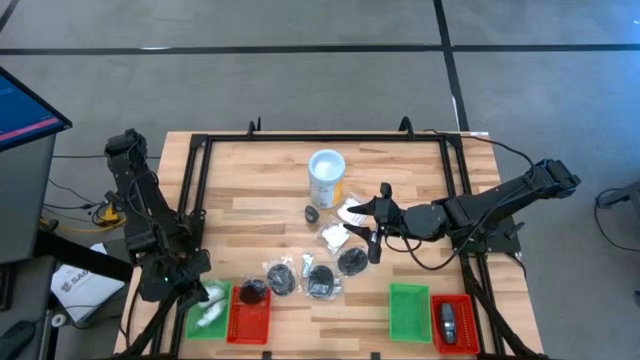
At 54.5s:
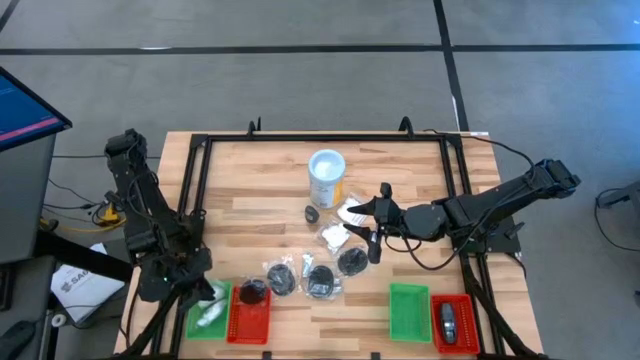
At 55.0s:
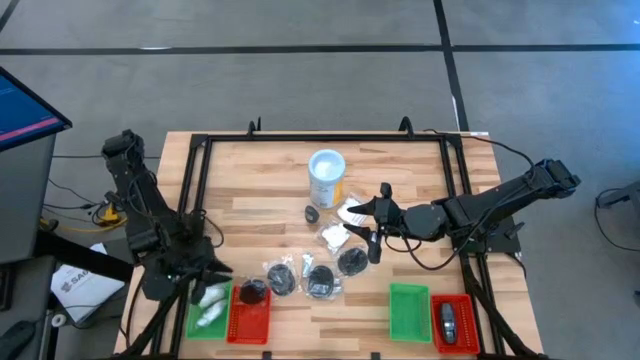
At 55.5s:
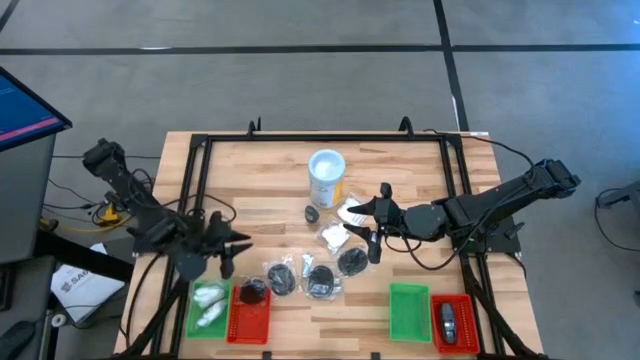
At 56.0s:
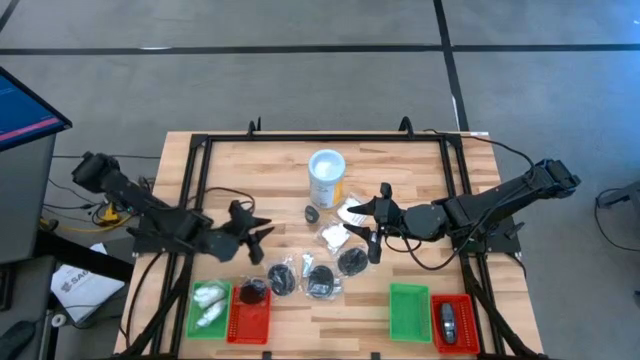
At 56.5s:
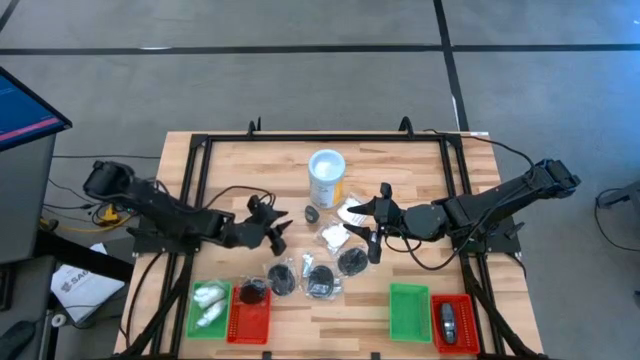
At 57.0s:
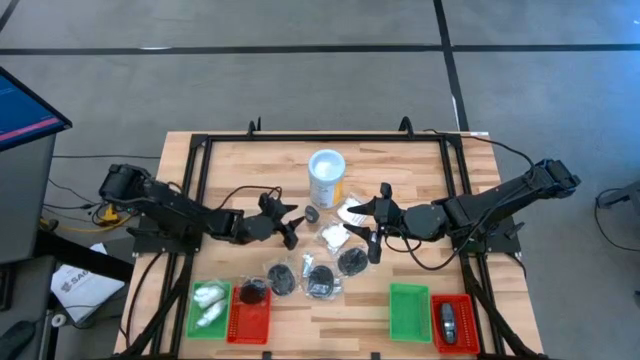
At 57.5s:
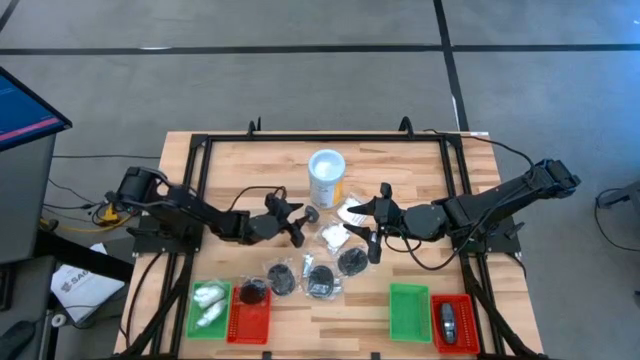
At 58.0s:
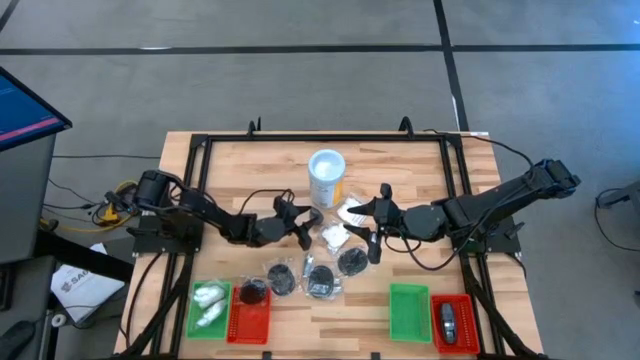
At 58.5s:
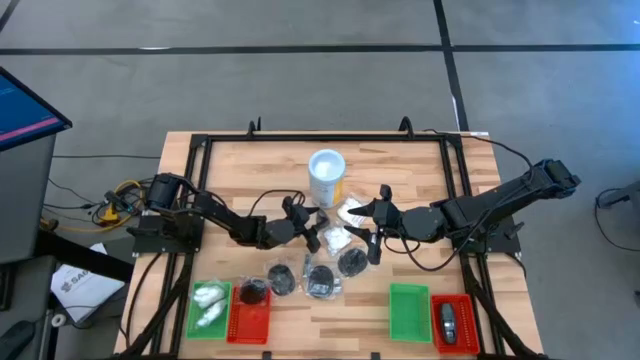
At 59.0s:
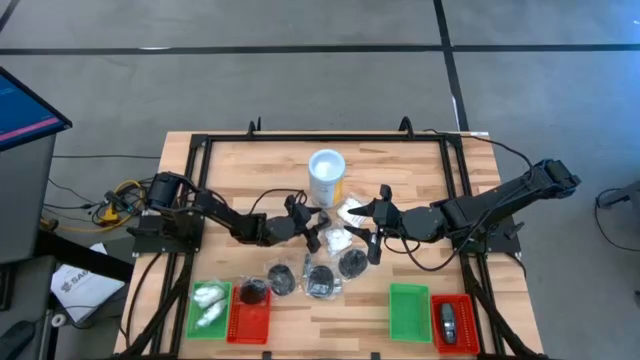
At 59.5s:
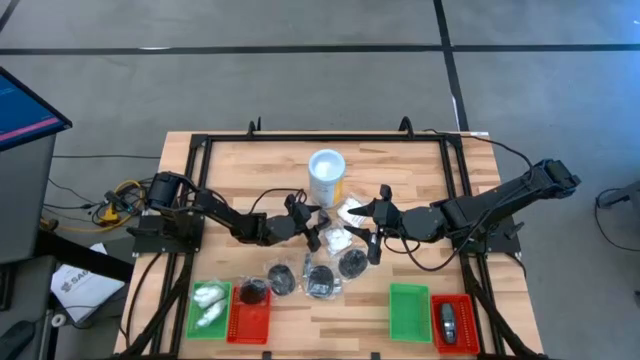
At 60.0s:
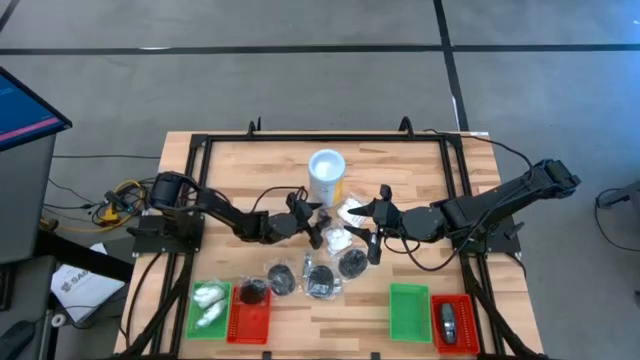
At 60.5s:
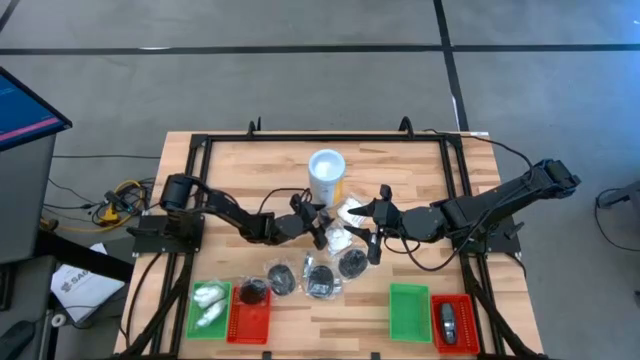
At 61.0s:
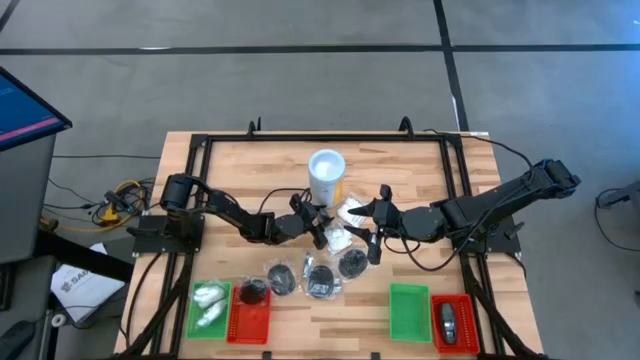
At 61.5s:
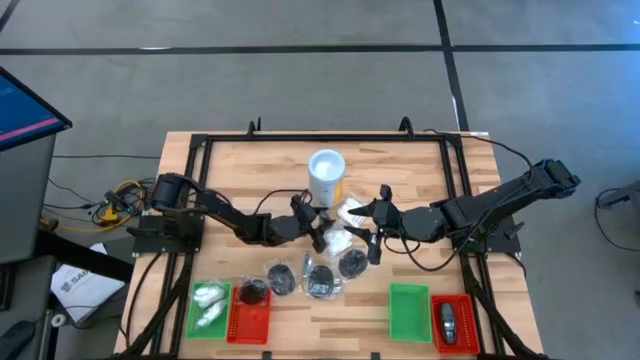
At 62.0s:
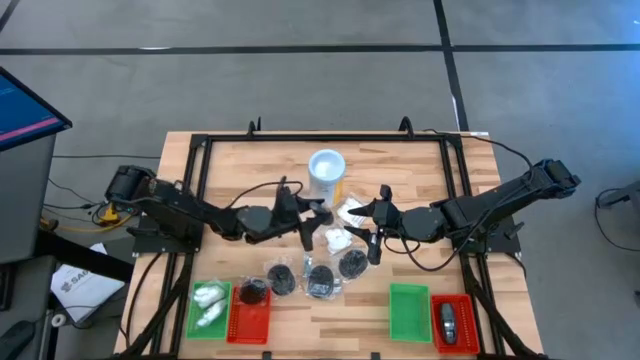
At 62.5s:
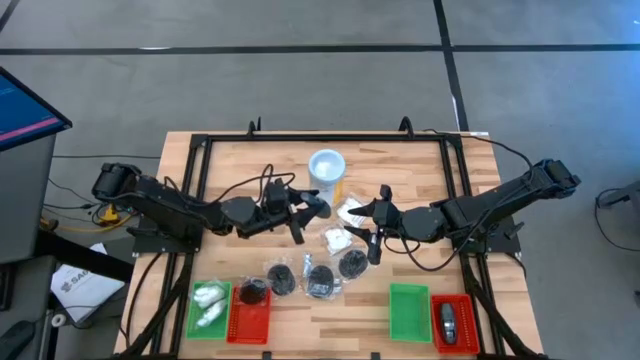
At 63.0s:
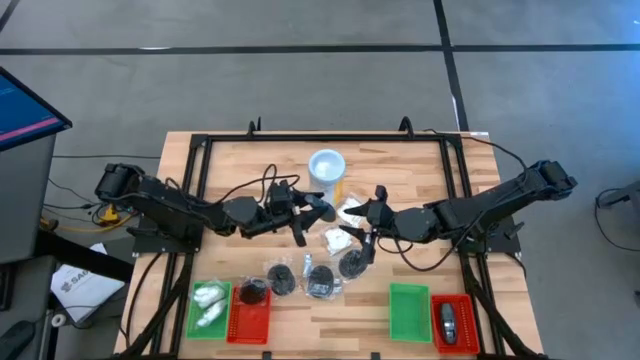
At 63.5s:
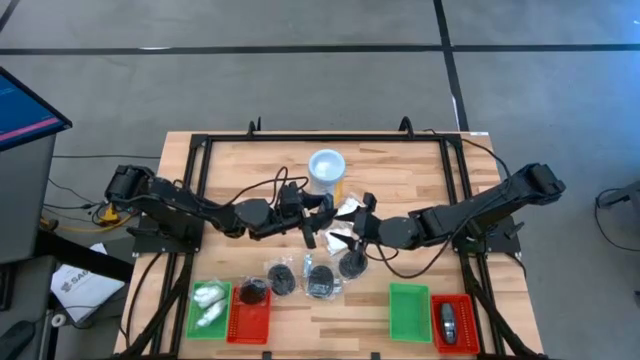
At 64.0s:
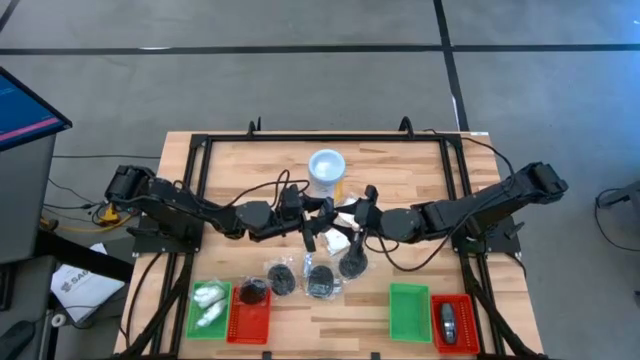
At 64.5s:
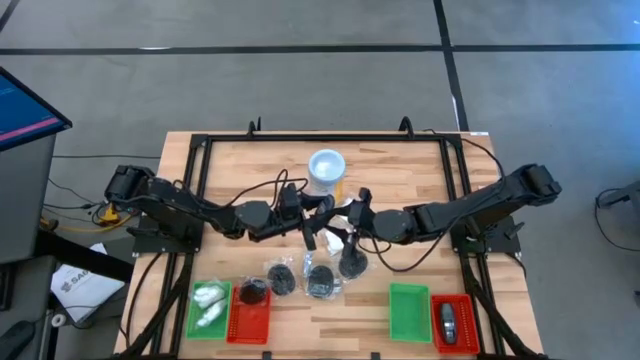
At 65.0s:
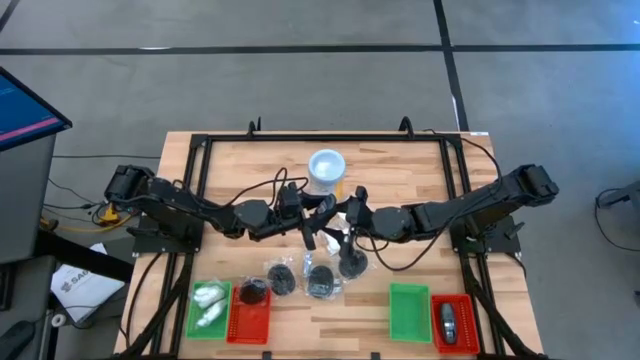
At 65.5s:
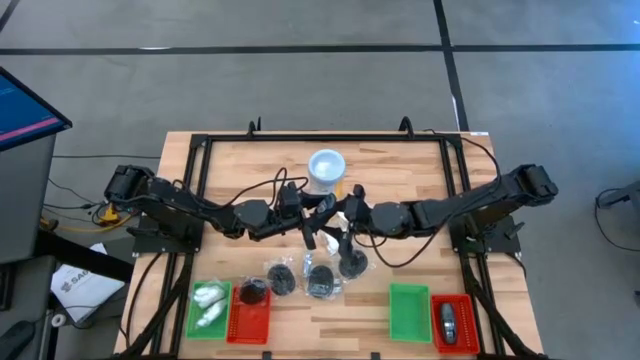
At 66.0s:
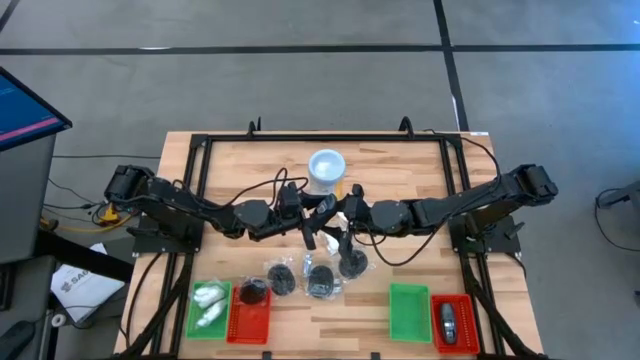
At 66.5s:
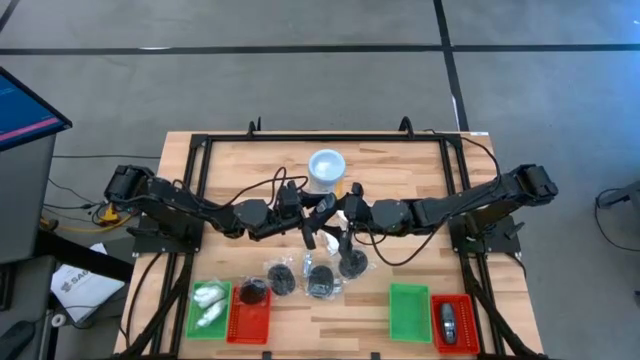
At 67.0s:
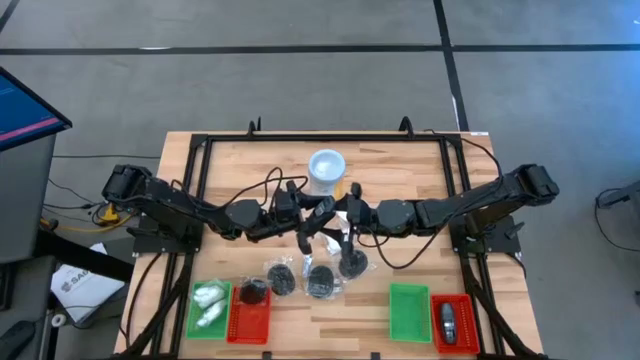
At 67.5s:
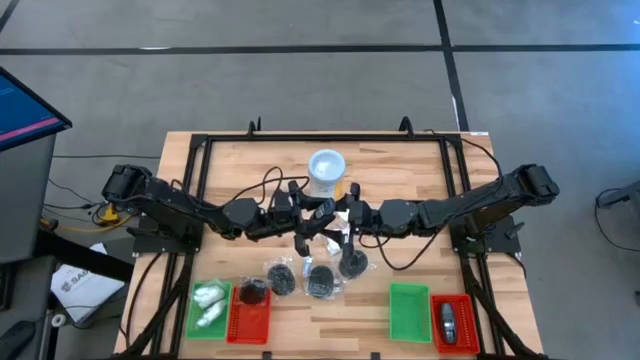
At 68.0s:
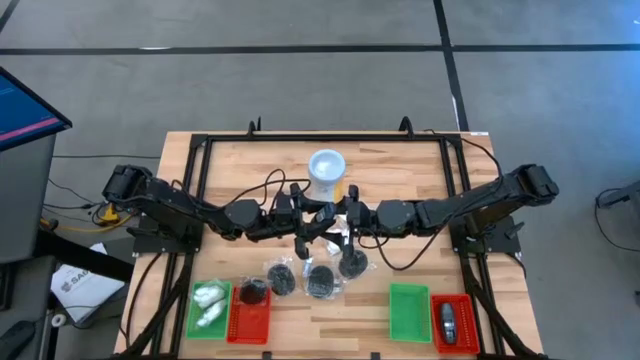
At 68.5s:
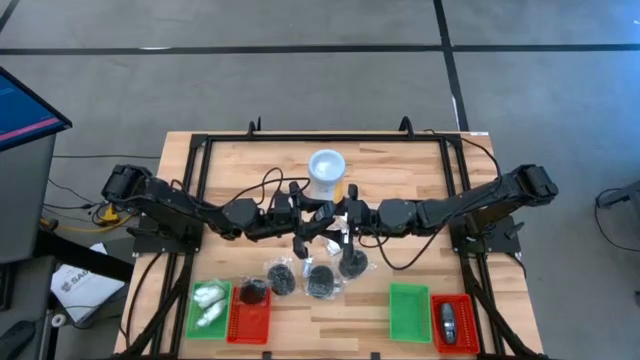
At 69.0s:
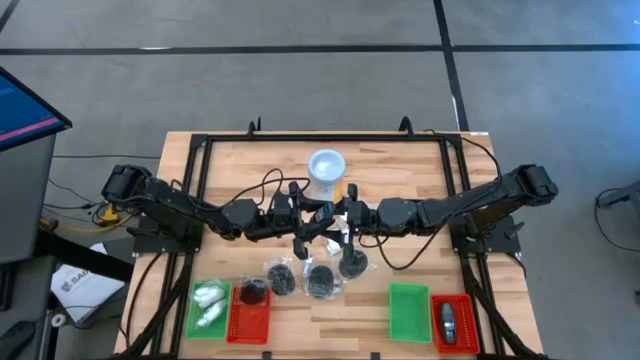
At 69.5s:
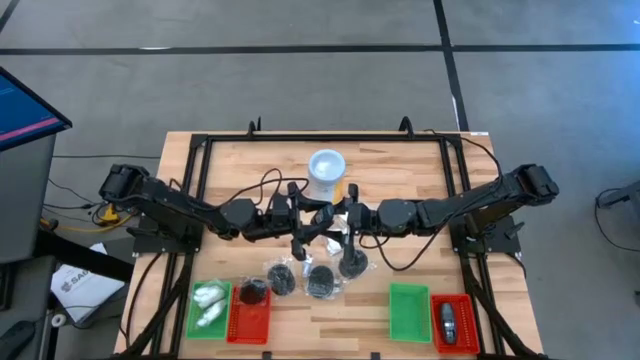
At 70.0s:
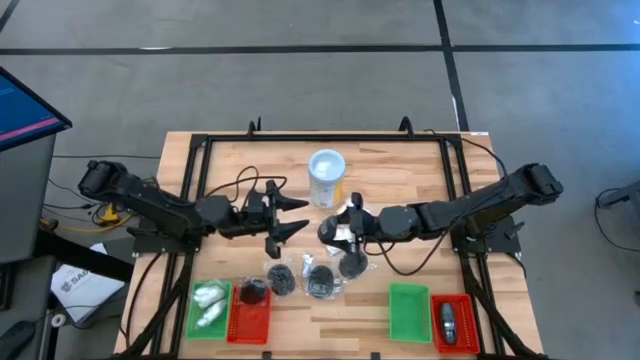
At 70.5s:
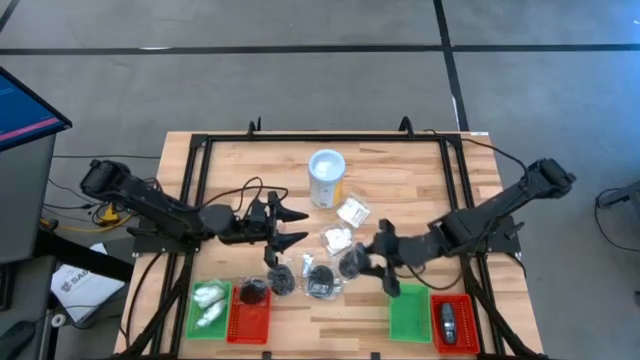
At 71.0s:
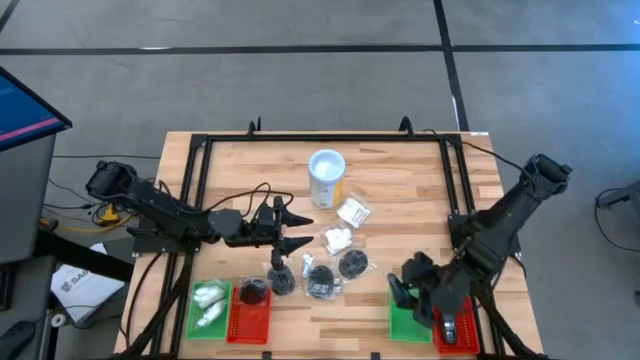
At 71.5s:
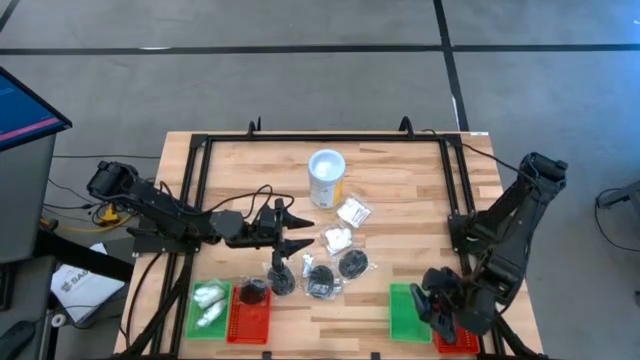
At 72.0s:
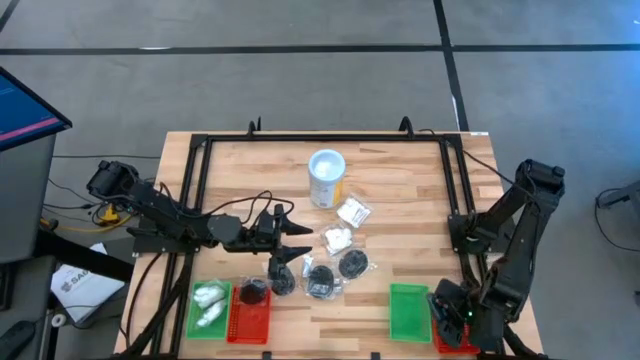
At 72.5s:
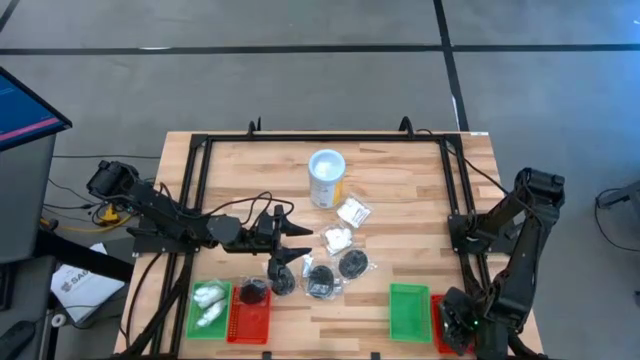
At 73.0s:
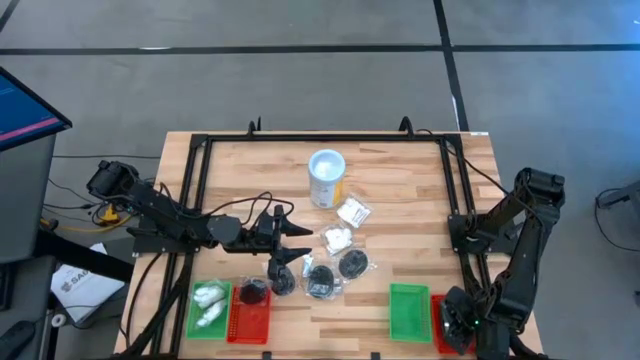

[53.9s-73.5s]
Task: Pick & Place Travel size toiletries
Put the deodorant into the right red bin

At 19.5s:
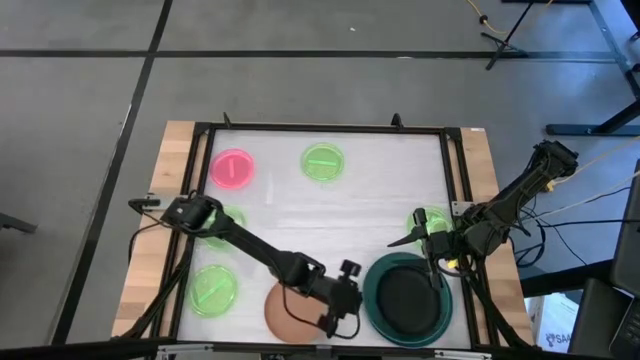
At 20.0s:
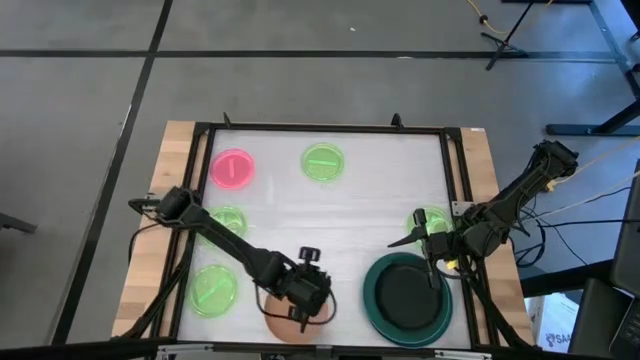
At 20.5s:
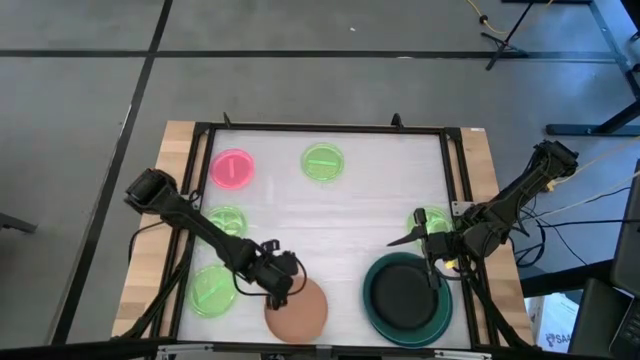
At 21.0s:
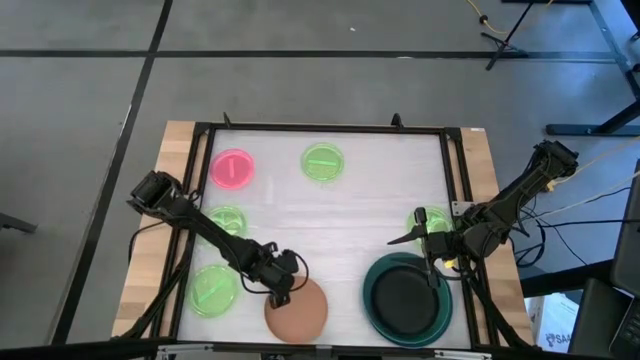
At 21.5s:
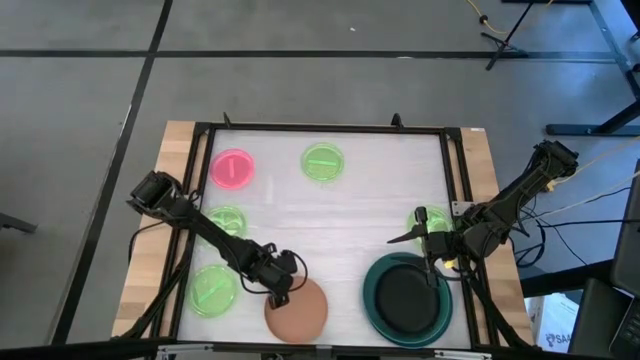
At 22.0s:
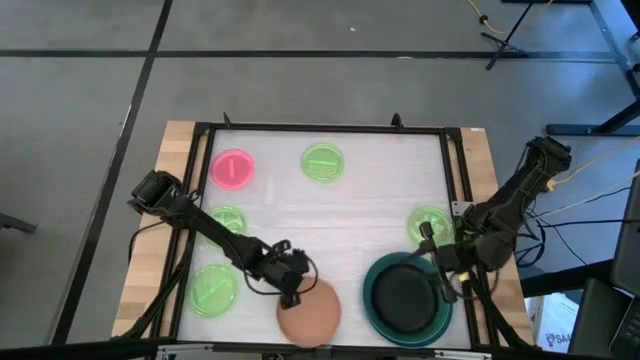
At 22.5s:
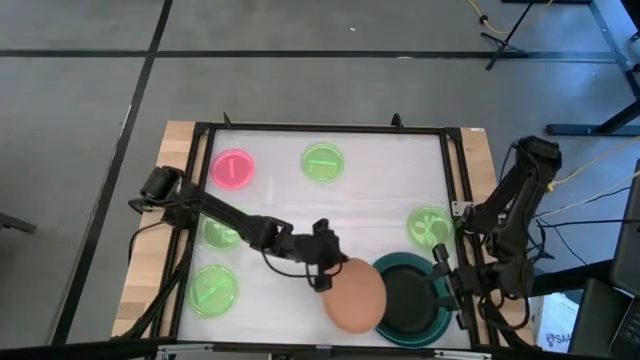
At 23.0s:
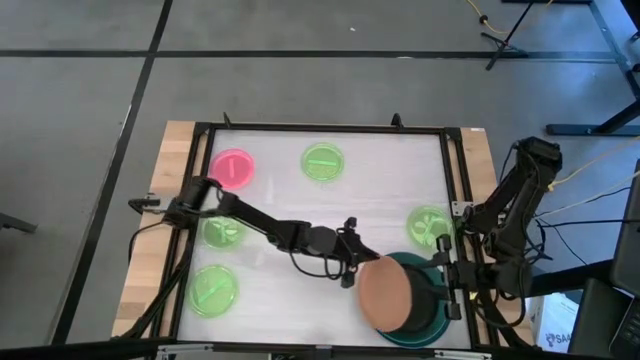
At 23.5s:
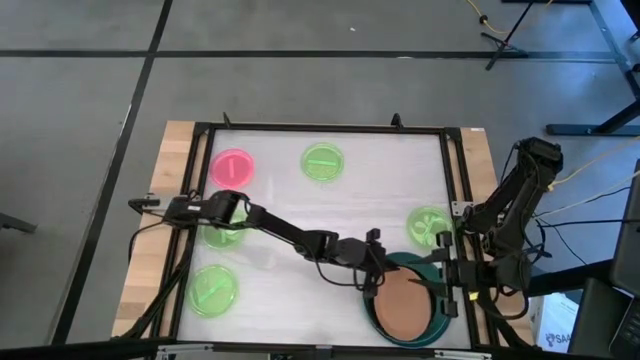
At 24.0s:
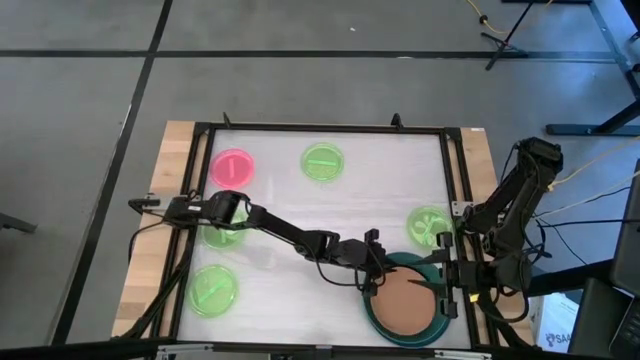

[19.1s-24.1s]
Task: Stack plastic plates
Stack the orange plate on top of the black plate
